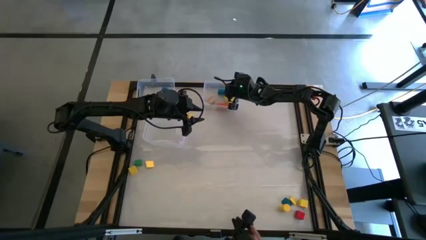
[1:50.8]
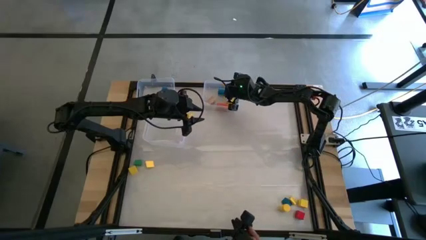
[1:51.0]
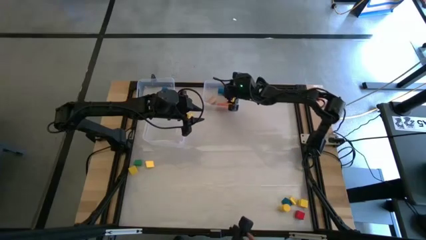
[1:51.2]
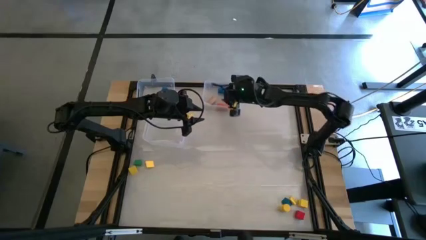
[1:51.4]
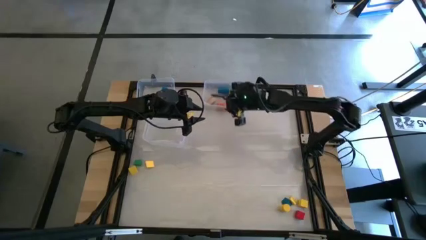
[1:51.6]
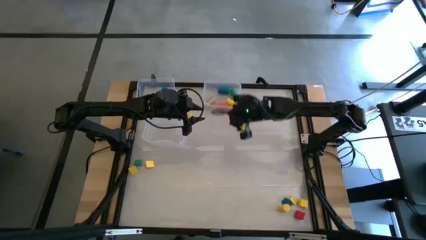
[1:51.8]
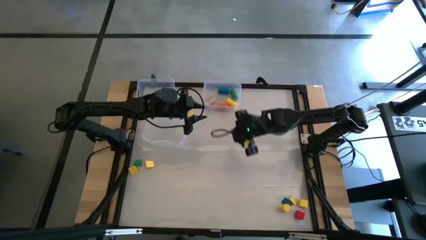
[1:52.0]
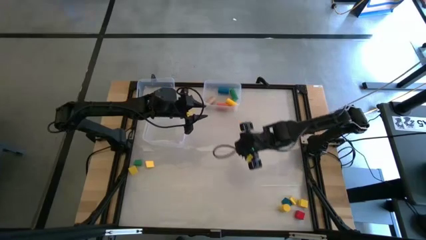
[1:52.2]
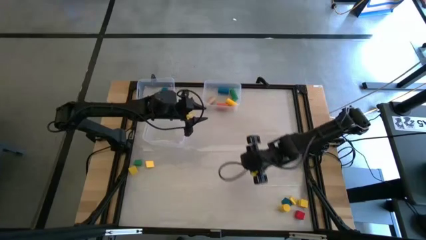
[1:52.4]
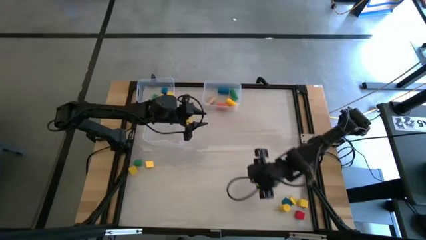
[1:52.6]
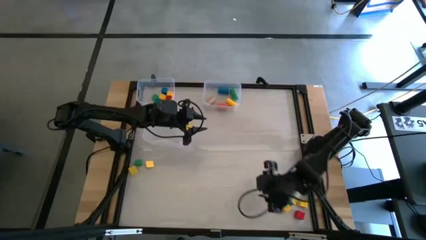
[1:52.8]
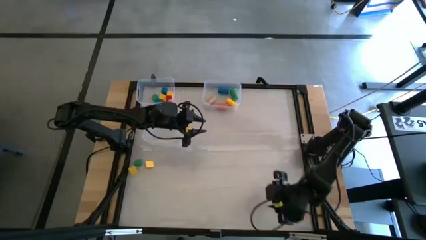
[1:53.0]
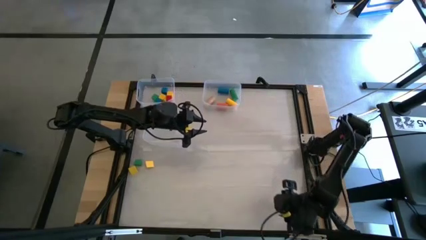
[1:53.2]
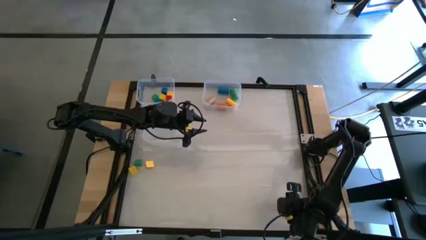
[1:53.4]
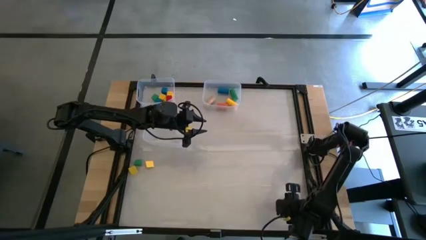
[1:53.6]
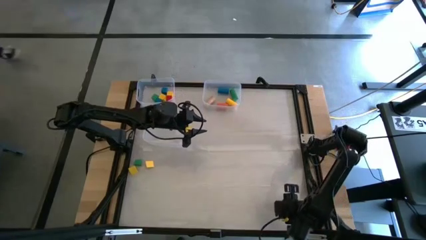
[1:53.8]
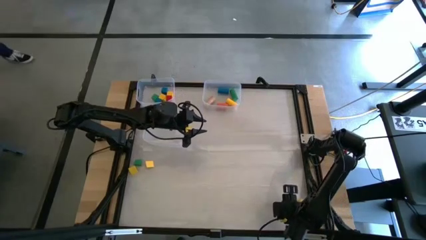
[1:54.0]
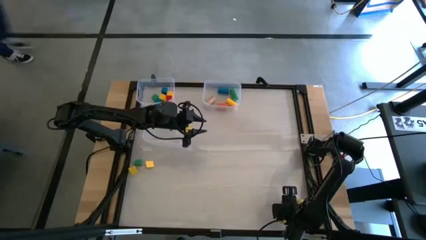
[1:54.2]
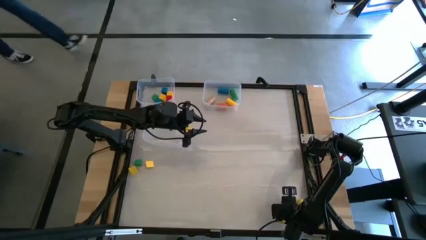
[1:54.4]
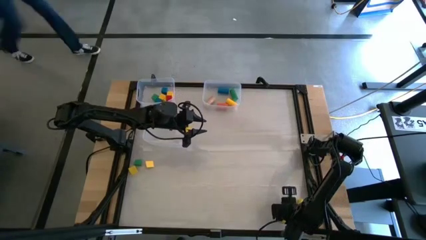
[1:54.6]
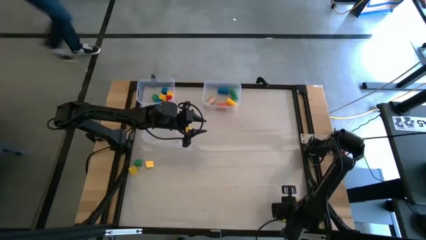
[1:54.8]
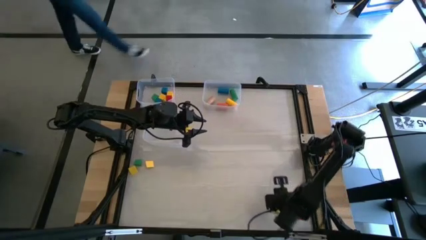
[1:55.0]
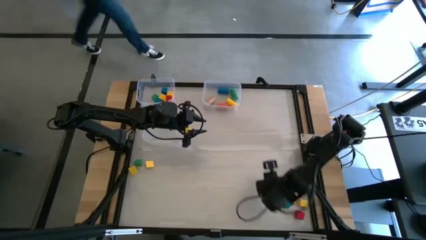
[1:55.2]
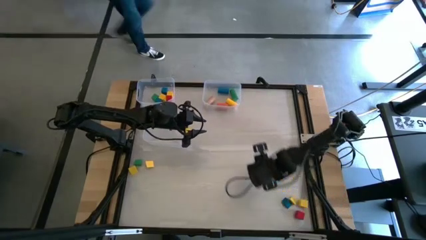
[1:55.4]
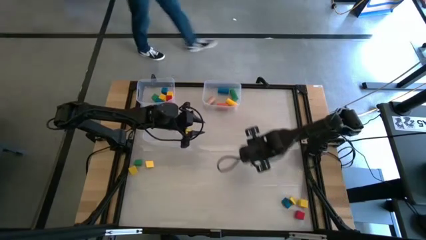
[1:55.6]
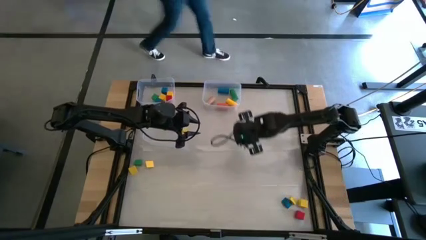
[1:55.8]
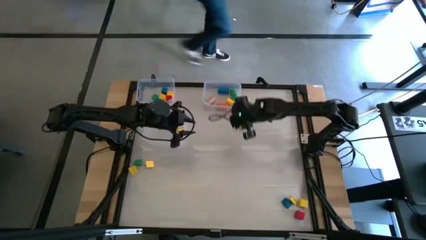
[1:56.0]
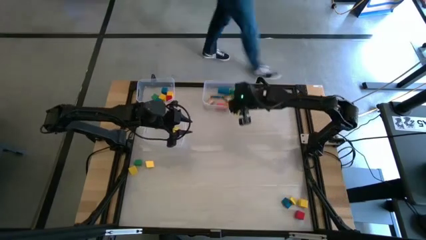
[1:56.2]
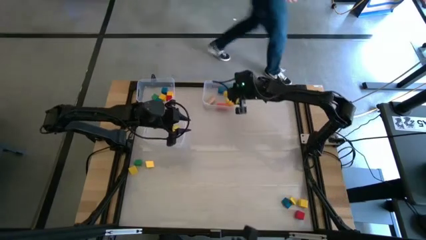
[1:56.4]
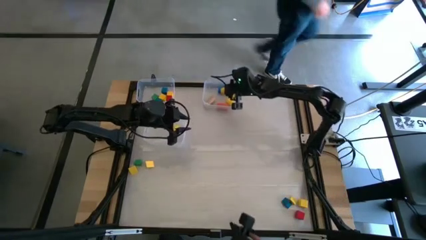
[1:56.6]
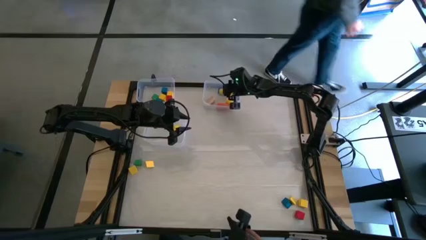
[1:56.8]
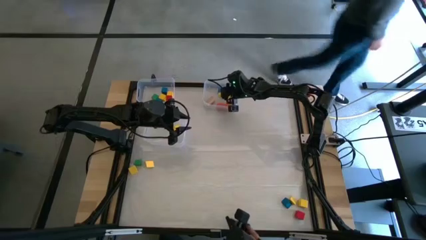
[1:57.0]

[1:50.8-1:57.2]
Task: Sort blocks by size
Put the yellow cylinder game block into the top center transparent bin

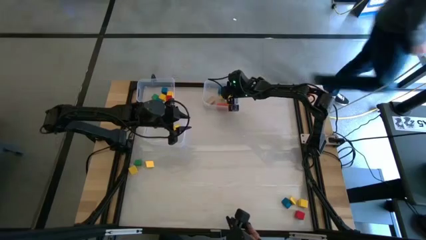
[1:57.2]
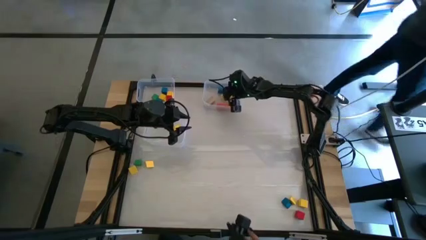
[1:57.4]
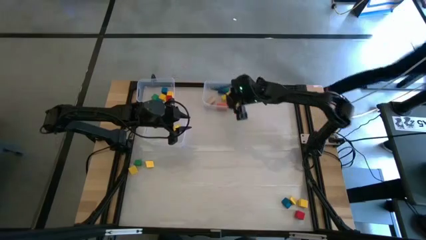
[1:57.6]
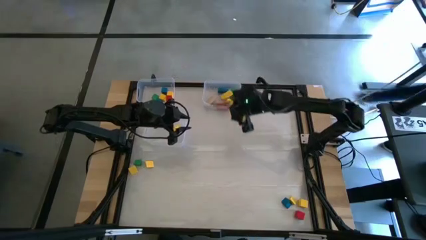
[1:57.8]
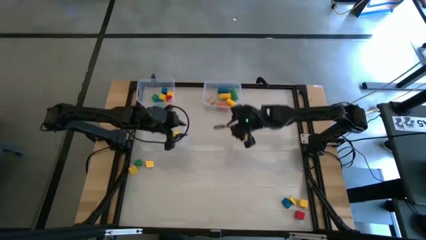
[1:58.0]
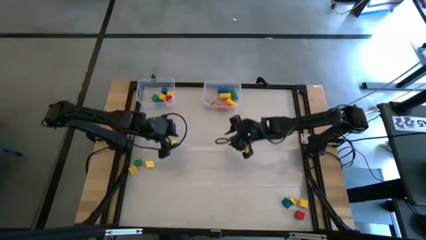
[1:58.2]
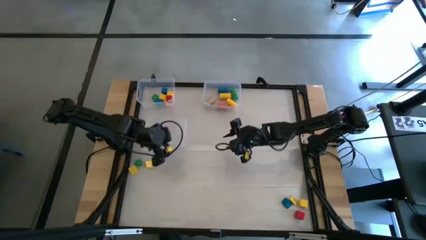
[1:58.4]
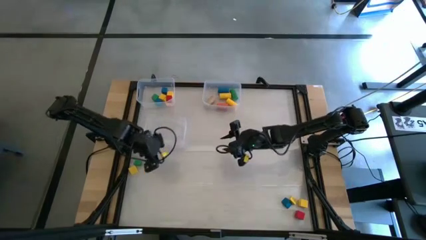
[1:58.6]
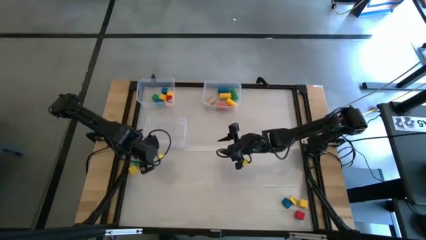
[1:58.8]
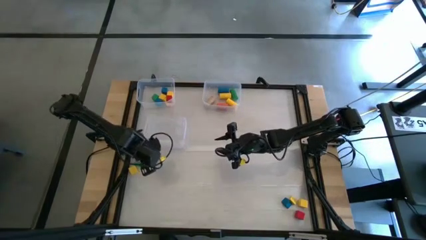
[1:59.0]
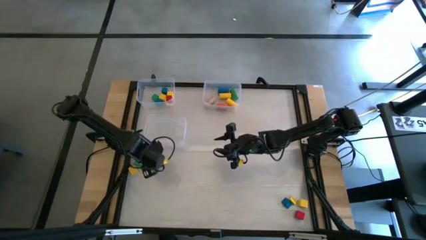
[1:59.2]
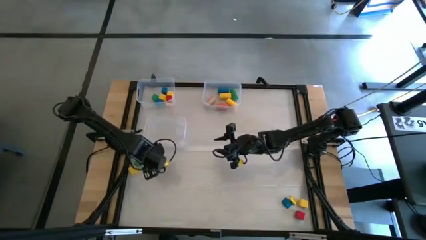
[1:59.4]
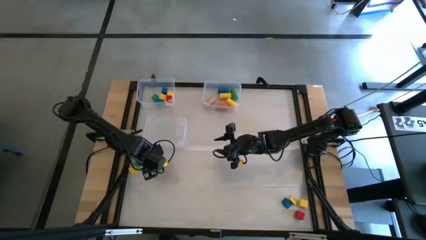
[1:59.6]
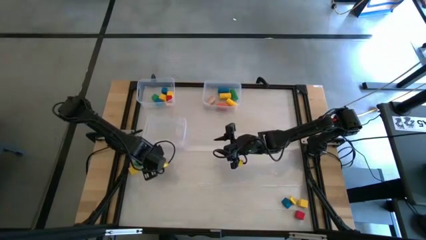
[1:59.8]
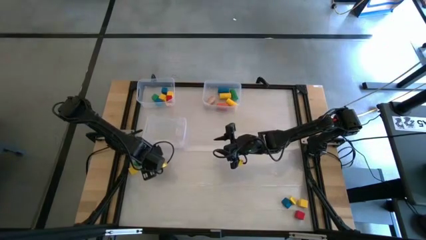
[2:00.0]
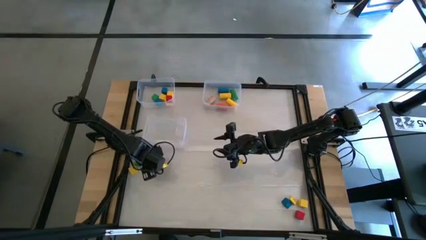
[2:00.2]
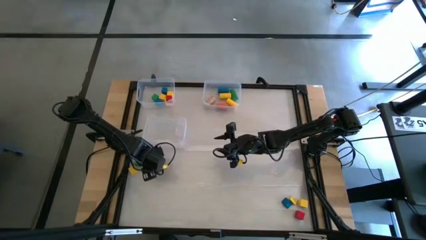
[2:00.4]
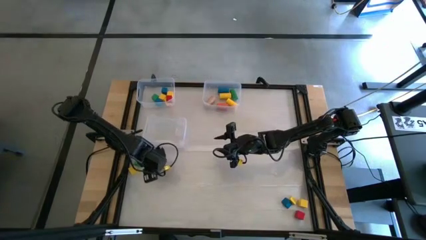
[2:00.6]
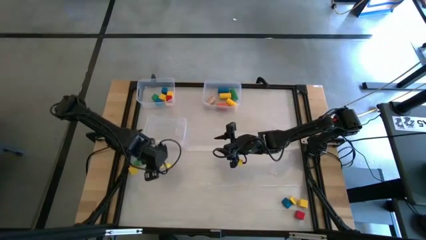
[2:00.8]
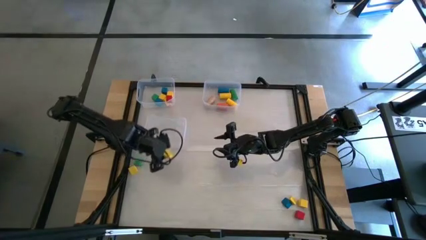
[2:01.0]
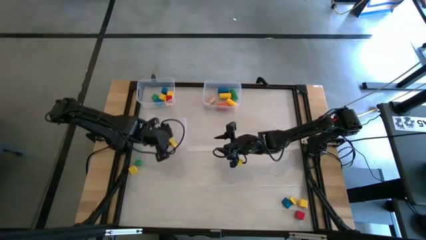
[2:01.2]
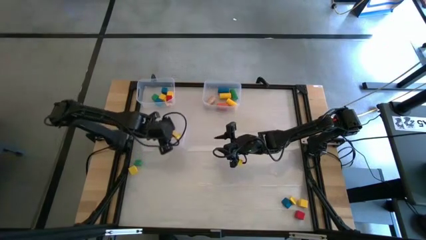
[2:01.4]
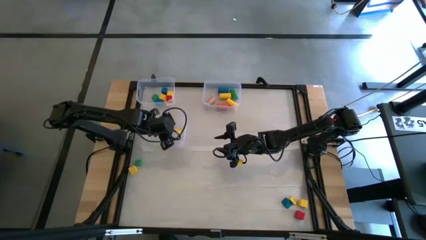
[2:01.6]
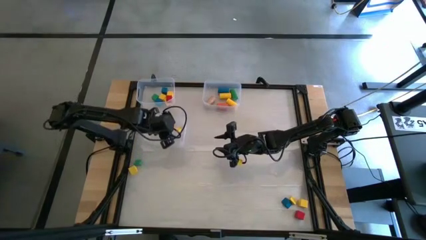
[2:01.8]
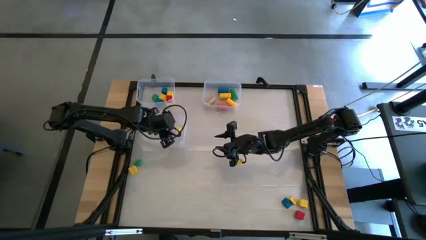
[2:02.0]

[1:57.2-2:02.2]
Put the yellow square game block into the bottom left transparent bin

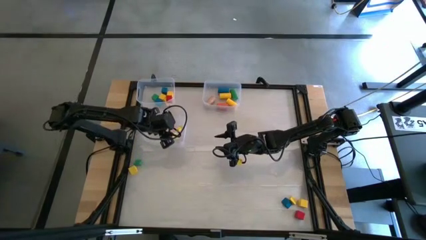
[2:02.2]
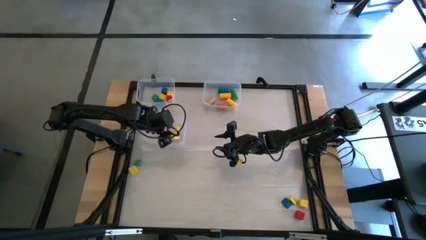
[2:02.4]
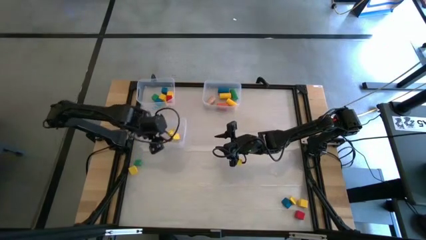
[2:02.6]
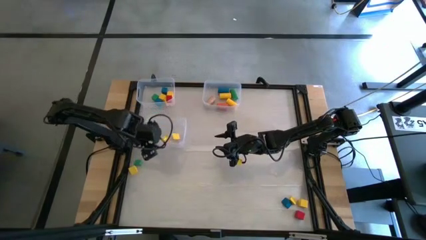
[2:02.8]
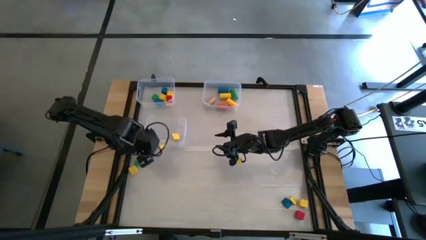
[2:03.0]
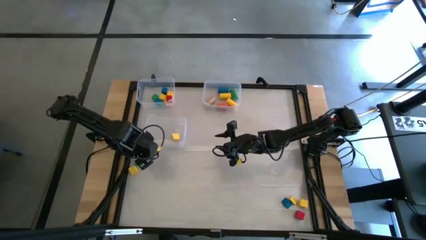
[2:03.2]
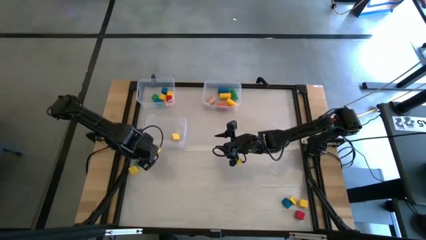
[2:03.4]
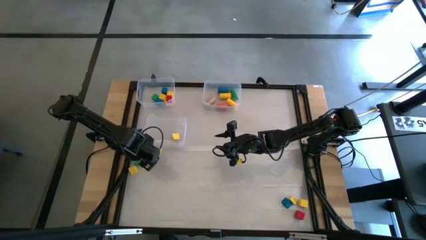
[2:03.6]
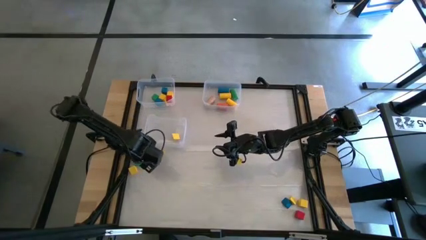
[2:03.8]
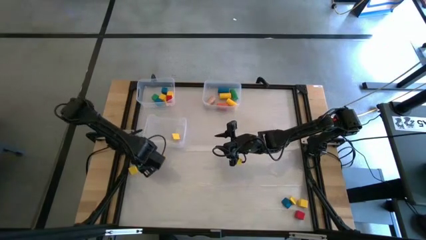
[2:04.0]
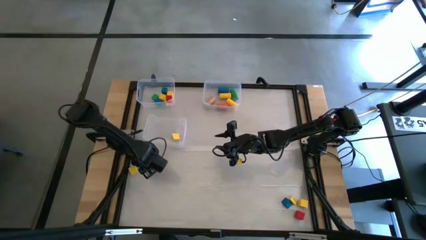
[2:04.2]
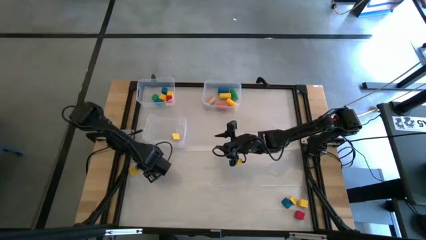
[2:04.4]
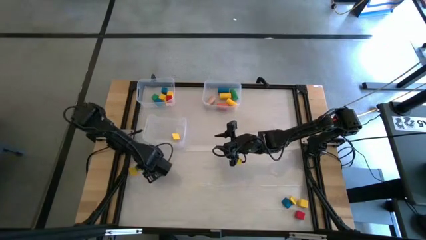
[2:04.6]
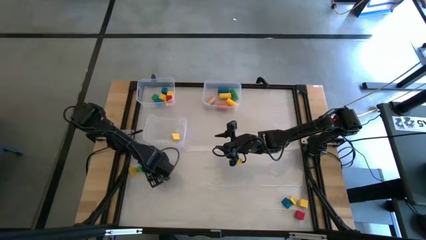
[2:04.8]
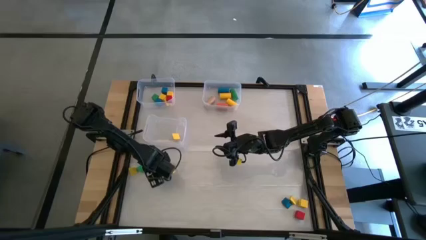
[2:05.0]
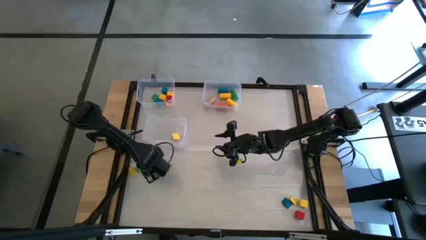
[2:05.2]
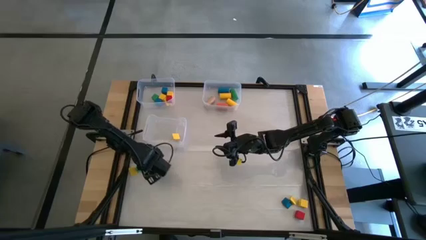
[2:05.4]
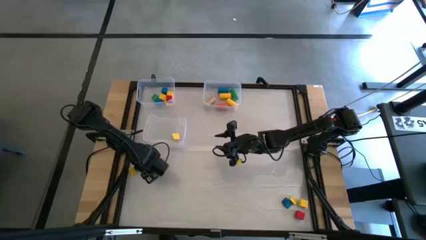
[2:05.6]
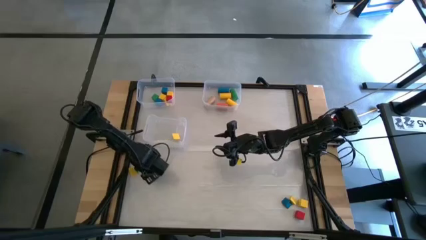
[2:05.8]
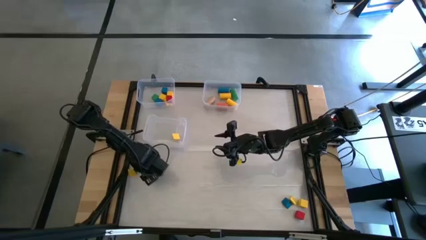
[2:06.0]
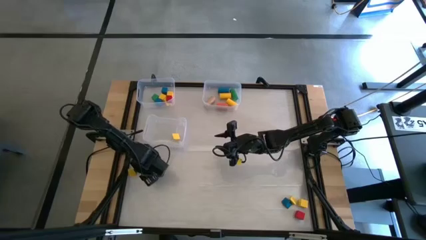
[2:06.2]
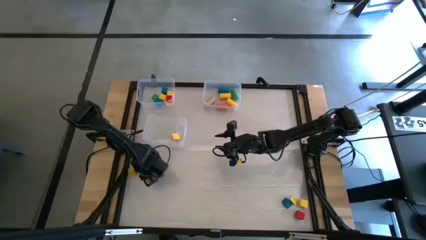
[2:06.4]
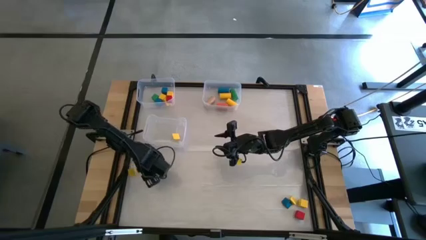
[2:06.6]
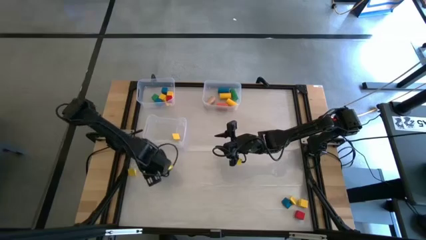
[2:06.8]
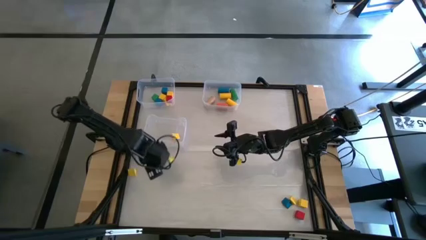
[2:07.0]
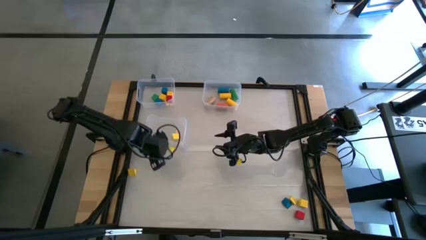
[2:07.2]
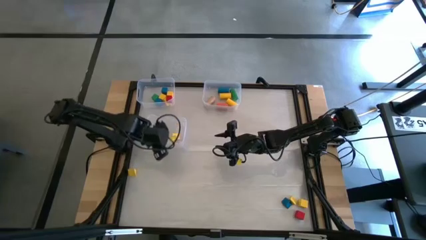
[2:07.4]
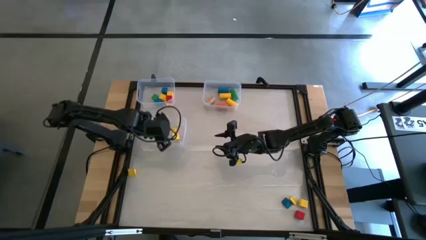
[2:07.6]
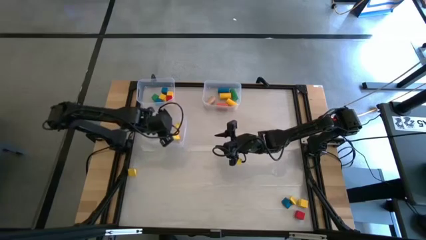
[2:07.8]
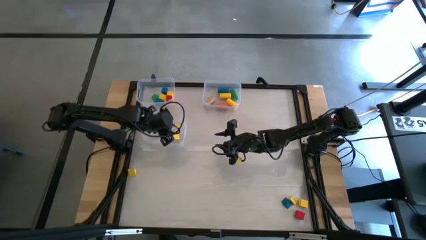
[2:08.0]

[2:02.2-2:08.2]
Put the green triangle game block into the bottom left transparent bin
